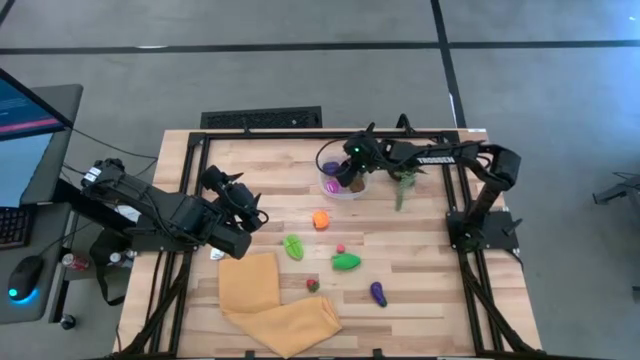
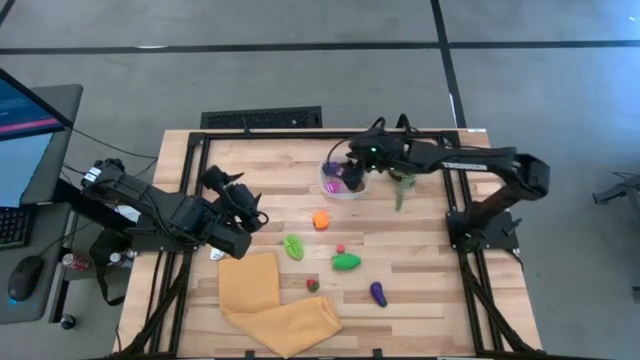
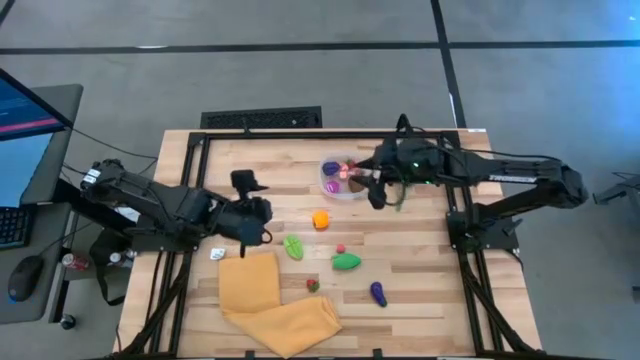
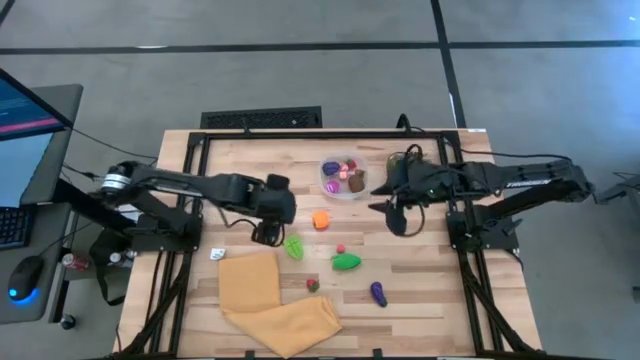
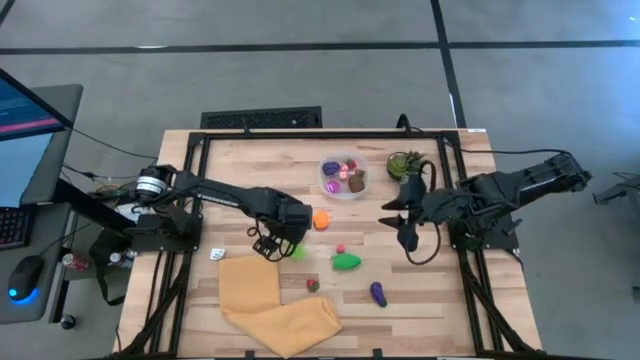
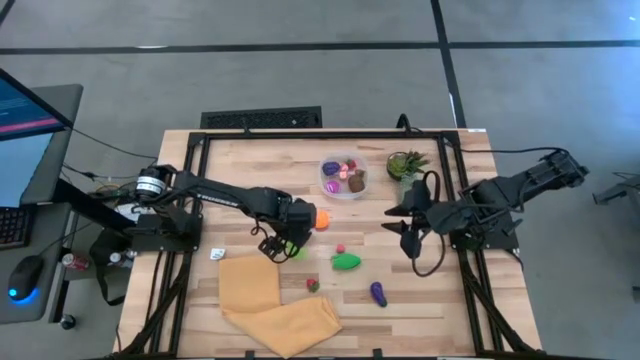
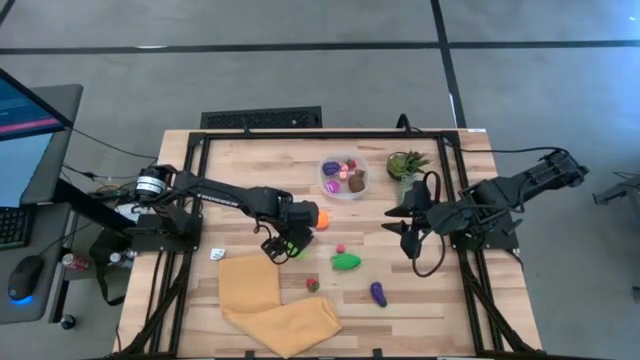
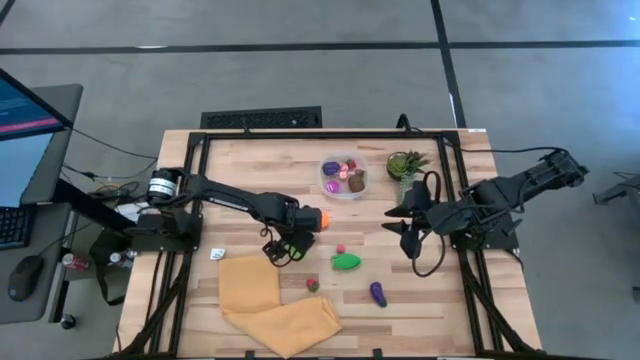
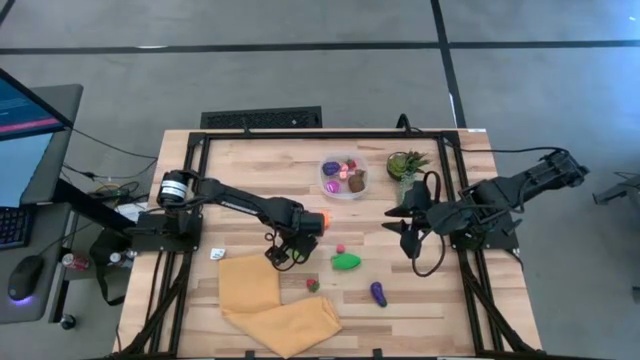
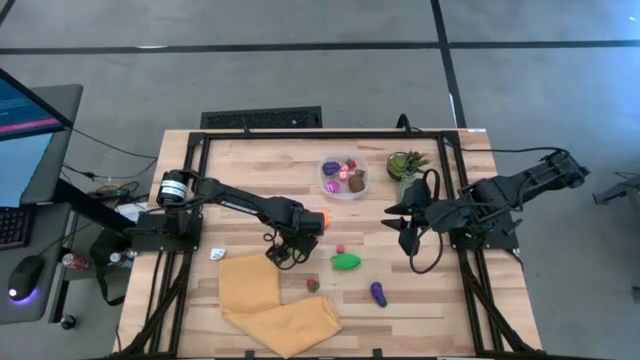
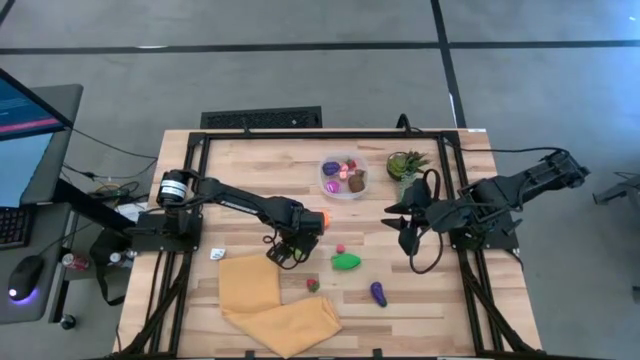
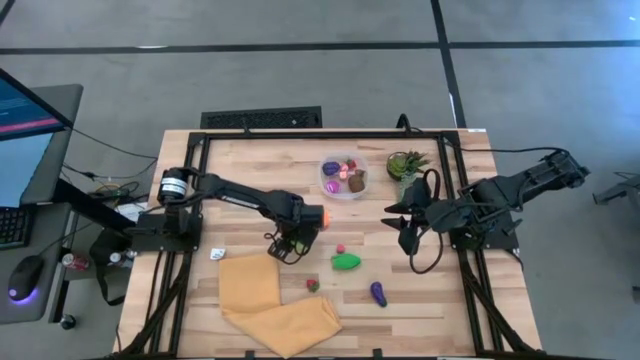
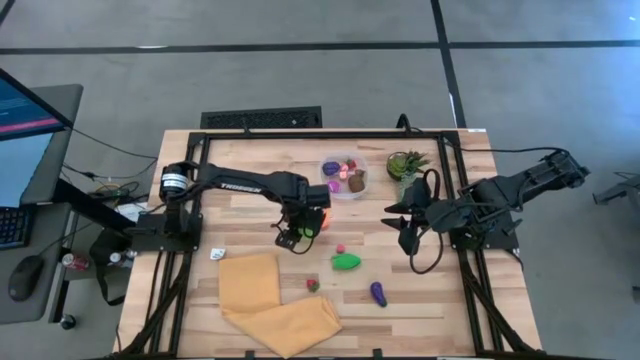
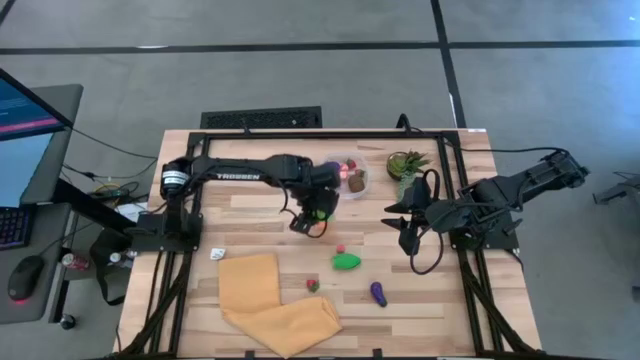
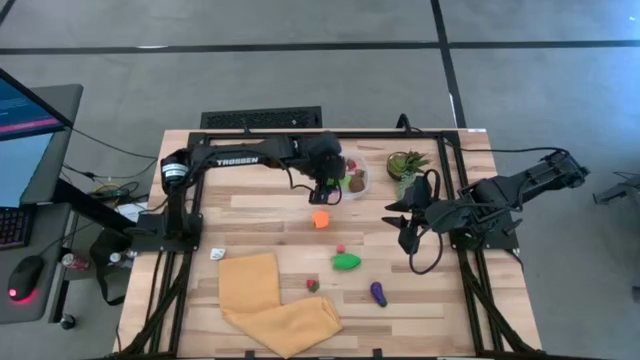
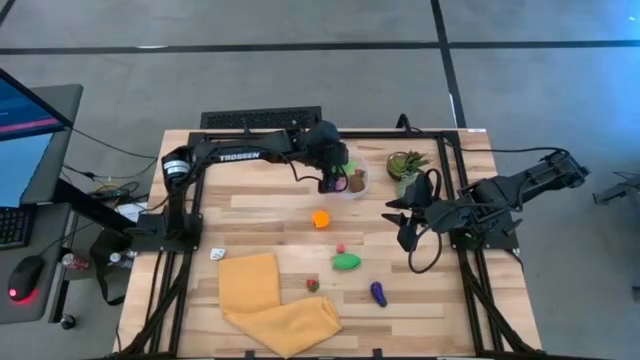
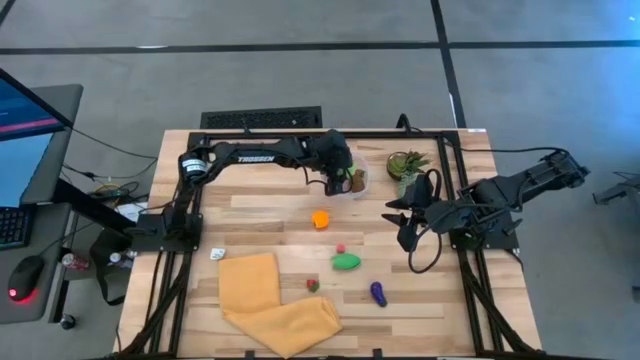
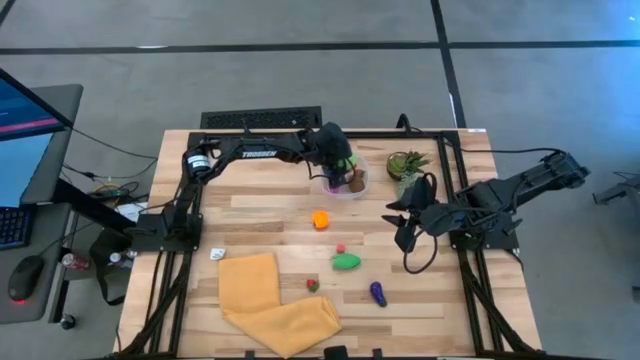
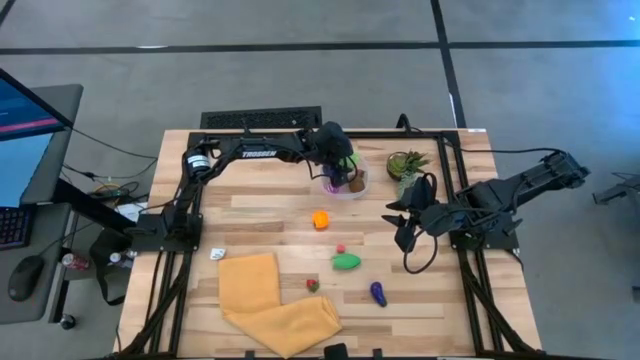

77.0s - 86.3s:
Task: Pick and placing Produce into tupperware
Put the starfruit in the transparent bin

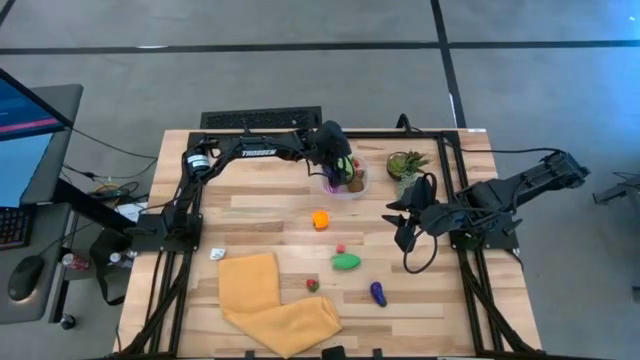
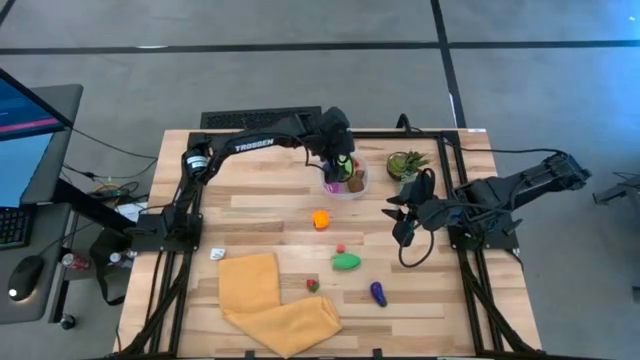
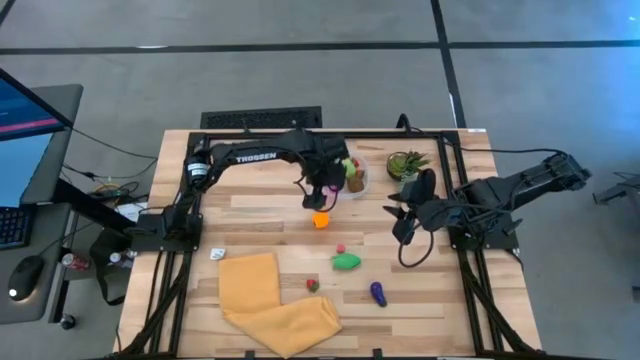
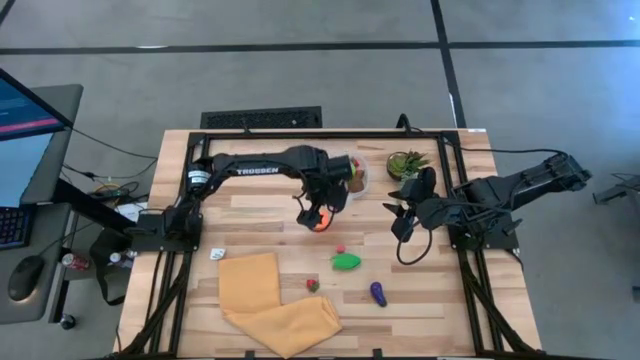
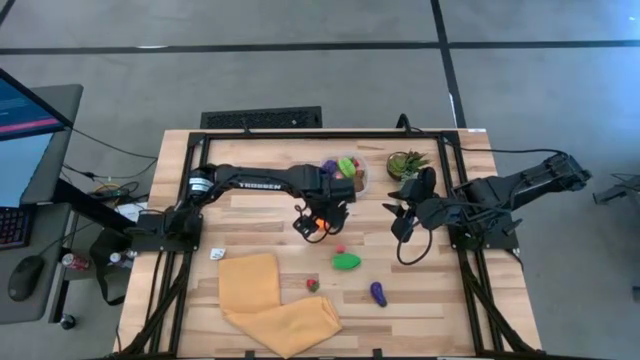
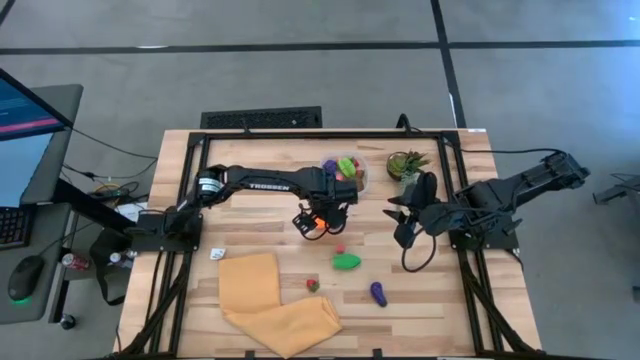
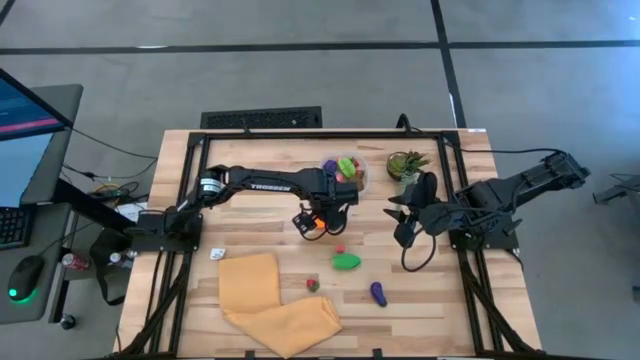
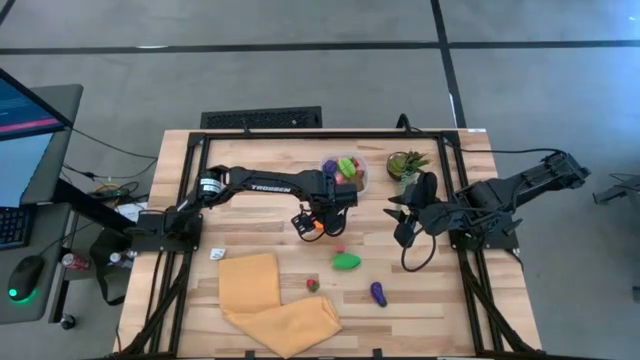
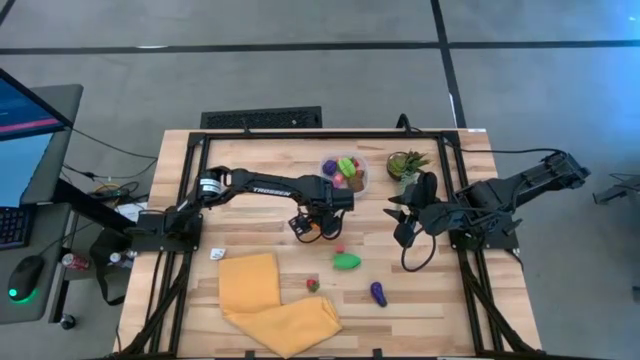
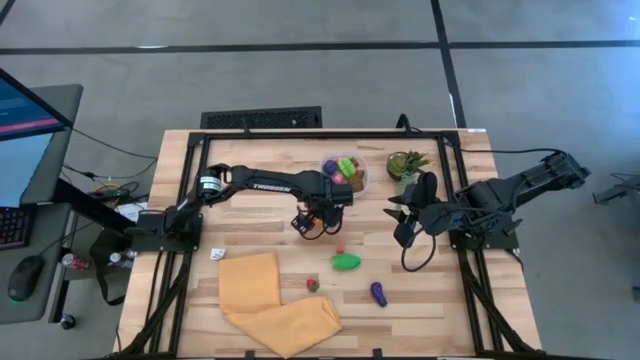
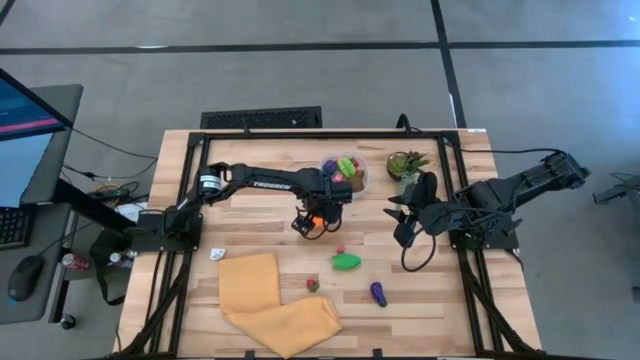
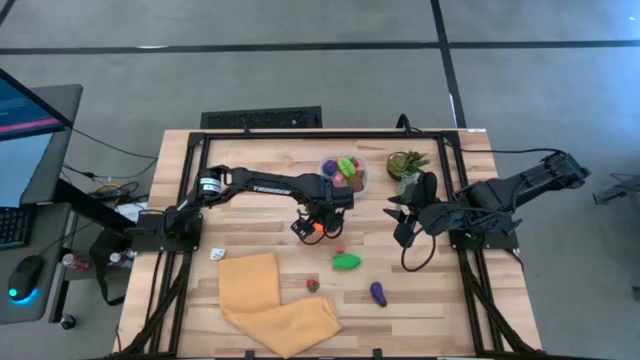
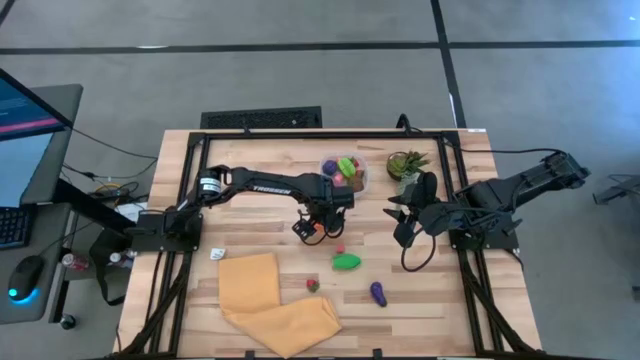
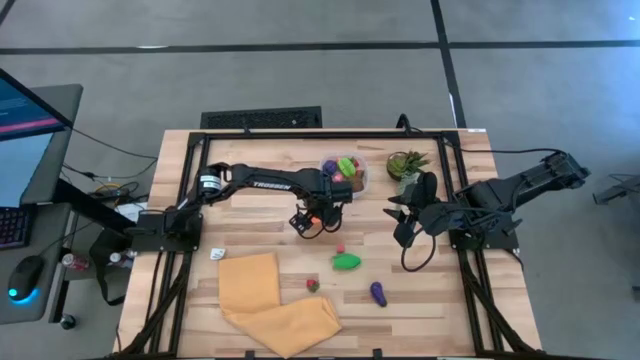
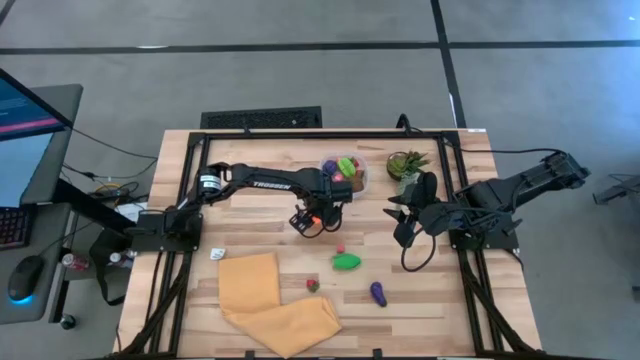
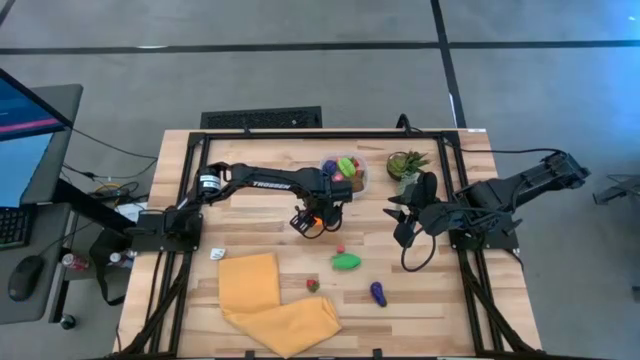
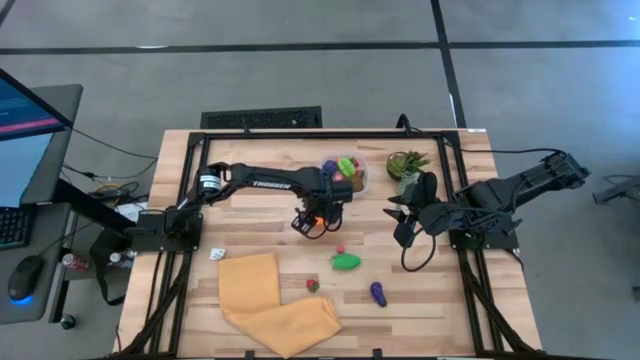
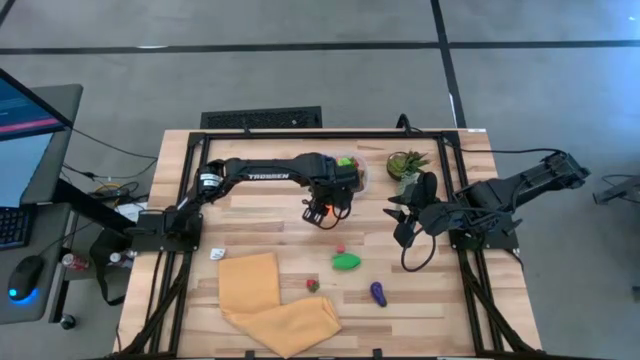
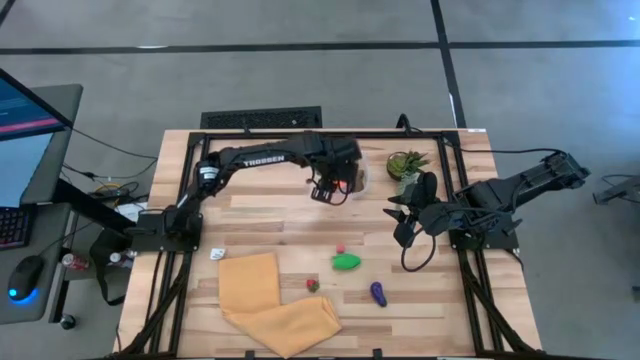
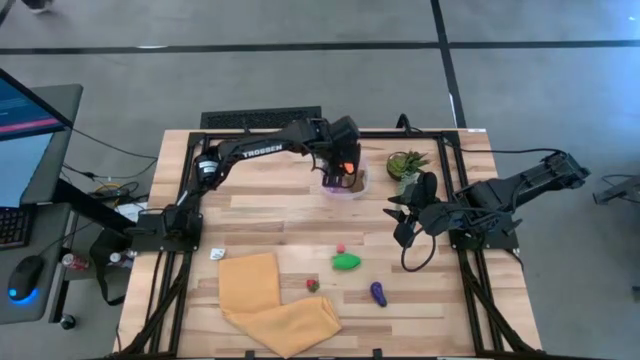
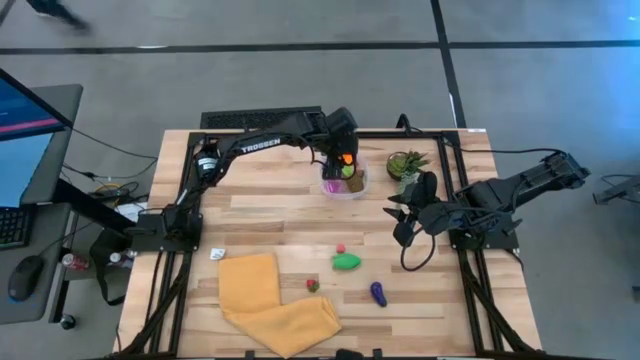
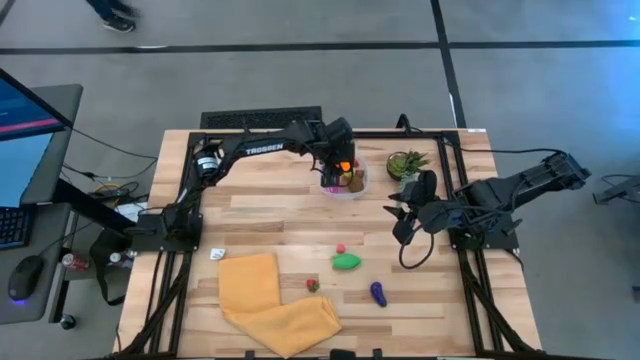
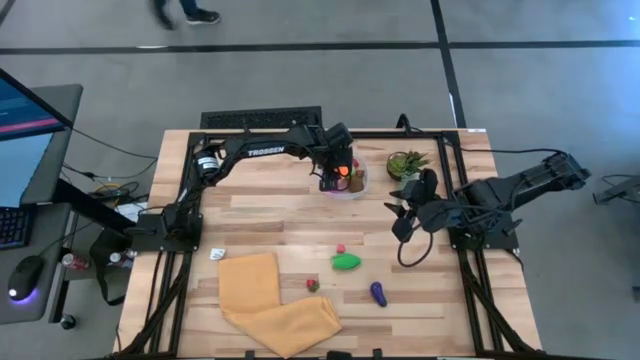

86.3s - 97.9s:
Put the orange in the transparent bin
